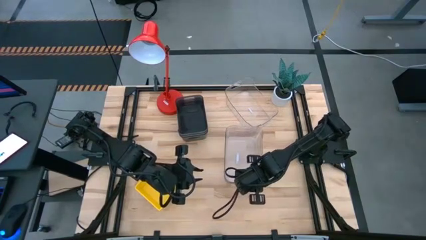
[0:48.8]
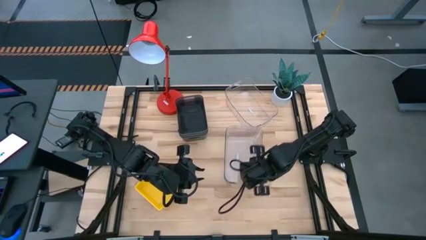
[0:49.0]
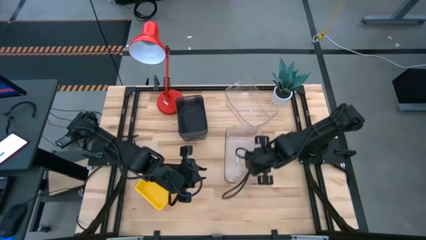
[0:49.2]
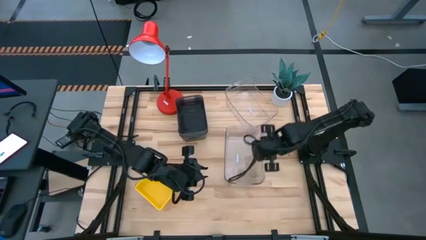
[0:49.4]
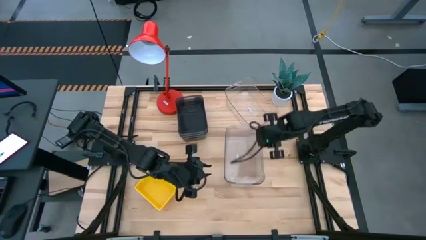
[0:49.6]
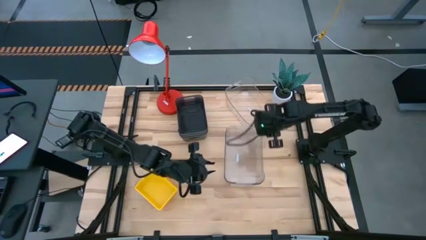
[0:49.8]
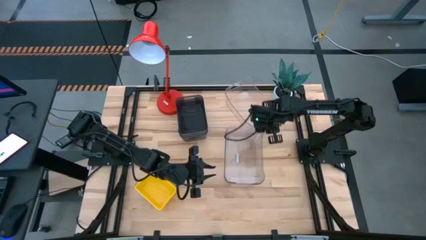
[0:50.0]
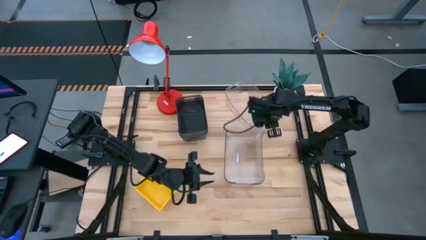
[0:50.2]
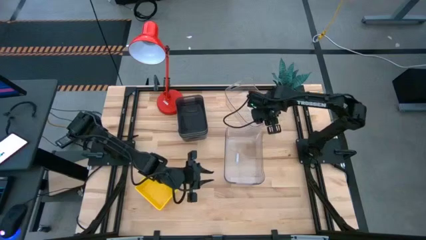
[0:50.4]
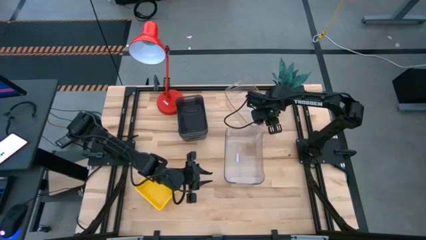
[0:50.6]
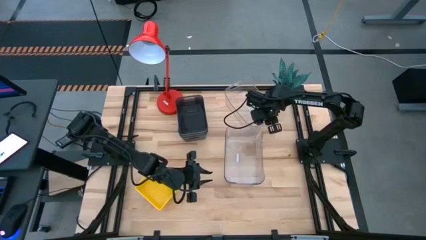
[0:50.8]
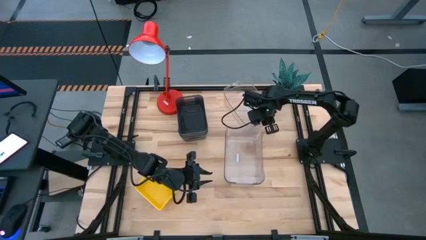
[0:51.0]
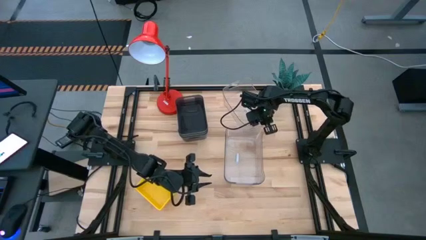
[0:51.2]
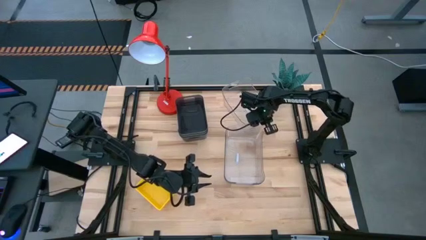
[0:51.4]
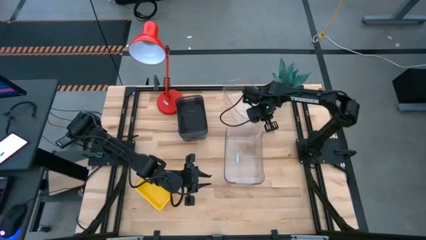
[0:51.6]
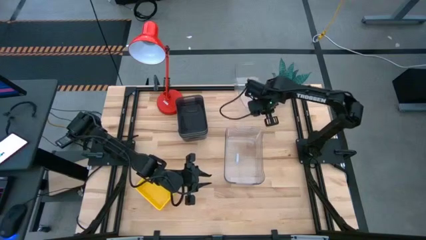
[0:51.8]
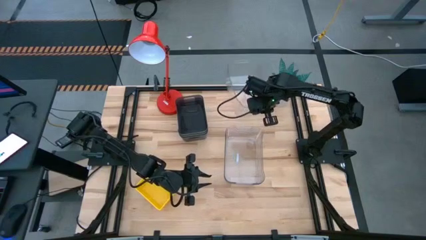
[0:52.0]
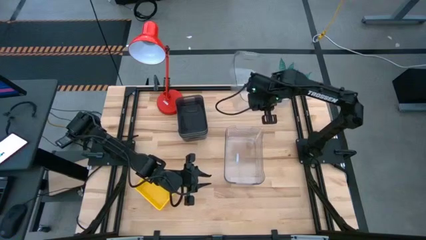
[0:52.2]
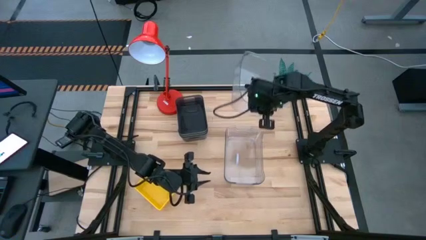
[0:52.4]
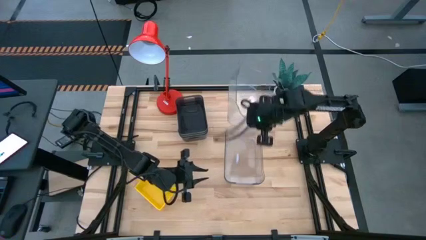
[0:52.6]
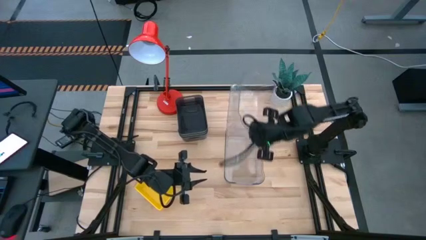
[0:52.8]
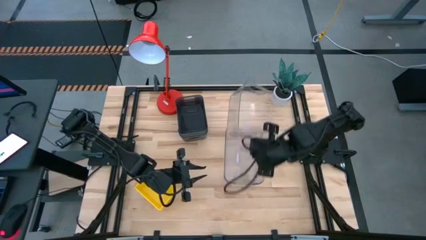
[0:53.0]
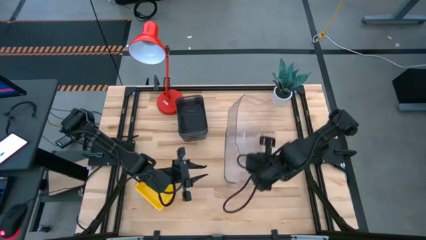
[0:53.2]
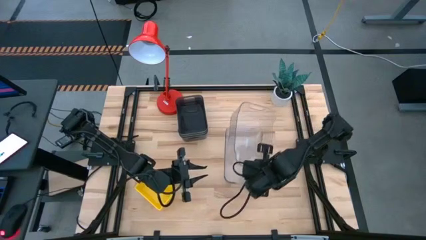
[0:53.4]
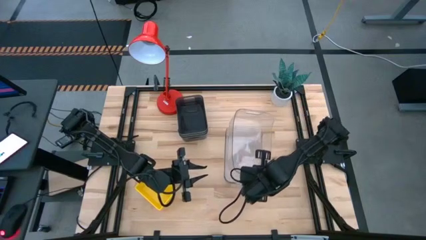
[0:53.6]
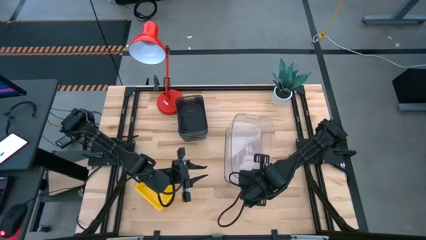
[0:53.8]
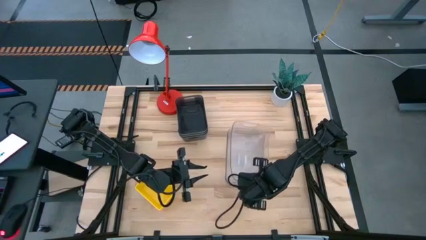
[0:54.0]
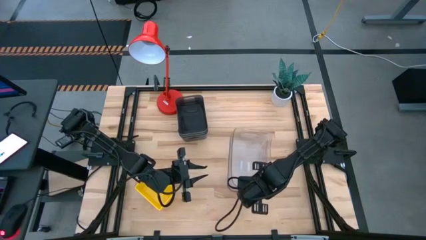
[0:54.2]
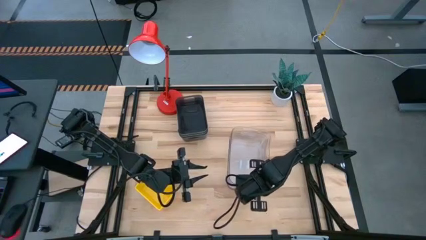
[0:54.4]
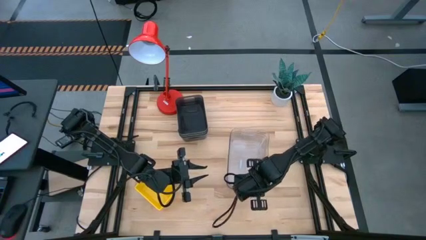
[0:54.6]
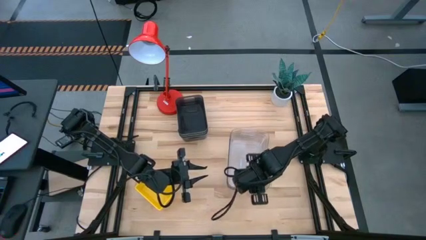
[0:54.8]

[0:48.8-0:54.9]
Stack the top transparent bin on top of the bottom transparent bin

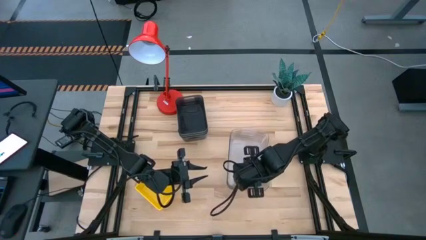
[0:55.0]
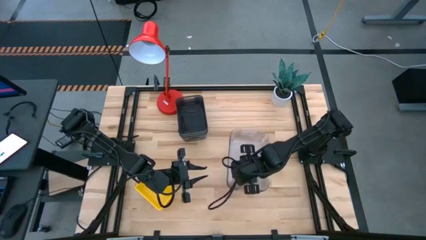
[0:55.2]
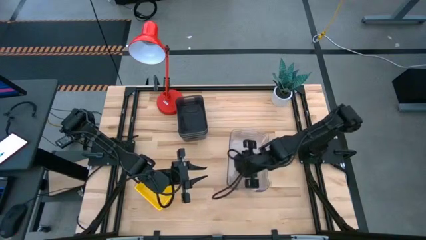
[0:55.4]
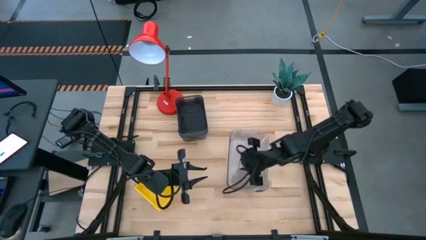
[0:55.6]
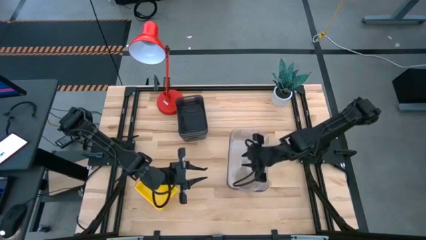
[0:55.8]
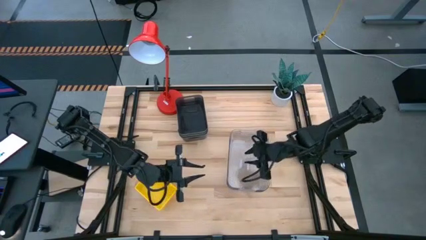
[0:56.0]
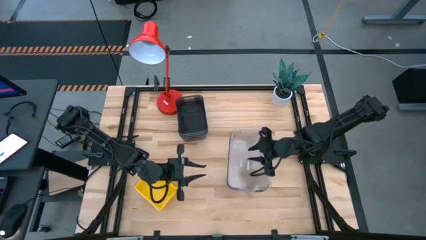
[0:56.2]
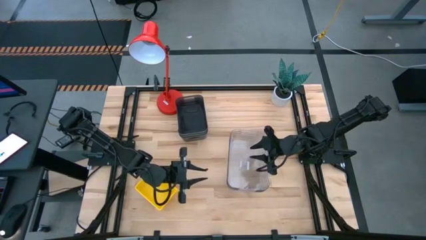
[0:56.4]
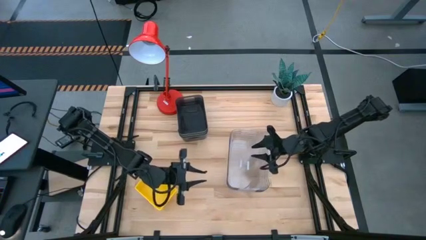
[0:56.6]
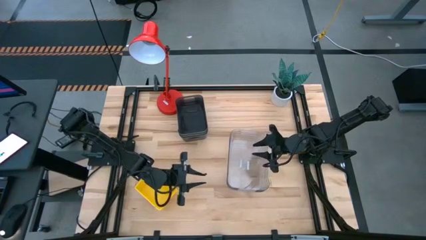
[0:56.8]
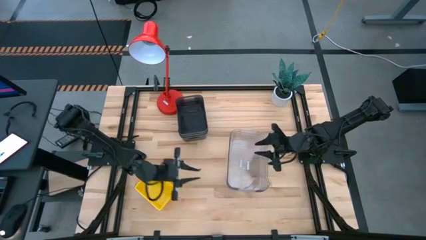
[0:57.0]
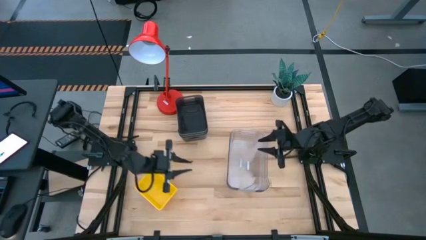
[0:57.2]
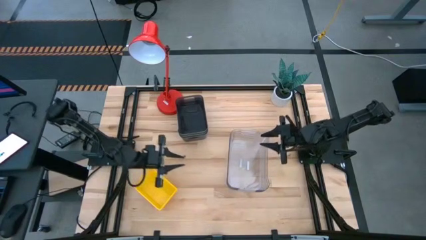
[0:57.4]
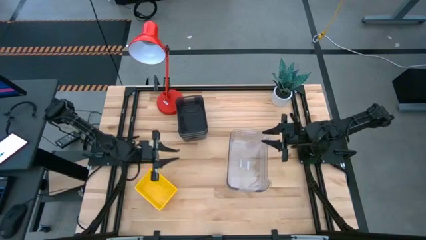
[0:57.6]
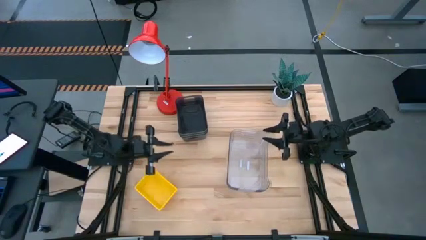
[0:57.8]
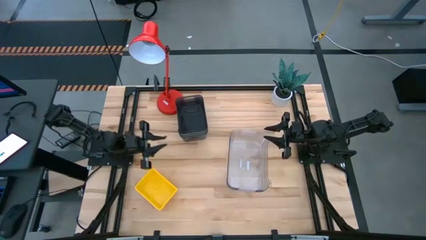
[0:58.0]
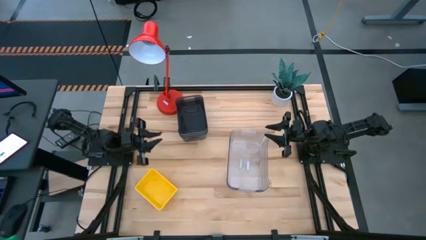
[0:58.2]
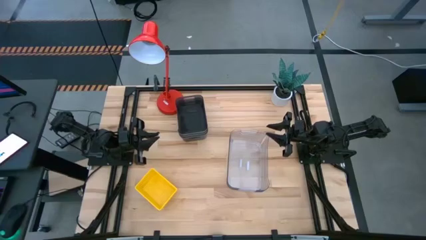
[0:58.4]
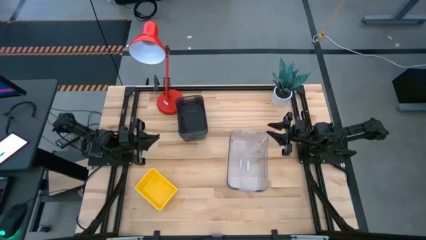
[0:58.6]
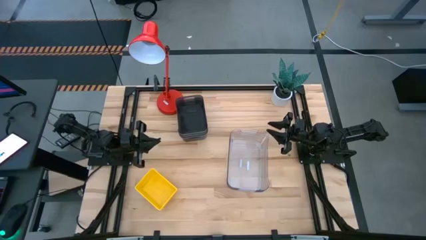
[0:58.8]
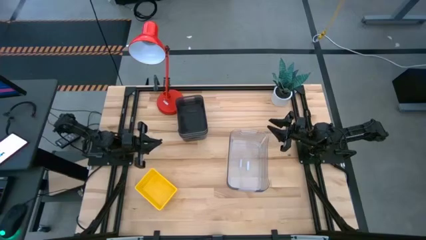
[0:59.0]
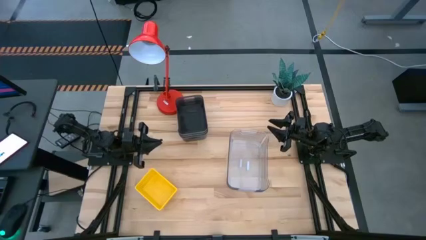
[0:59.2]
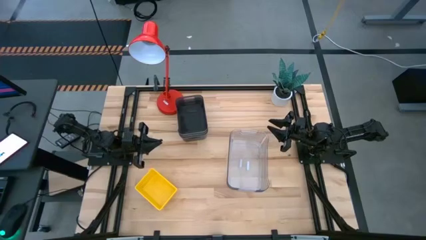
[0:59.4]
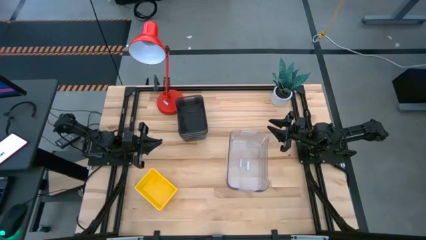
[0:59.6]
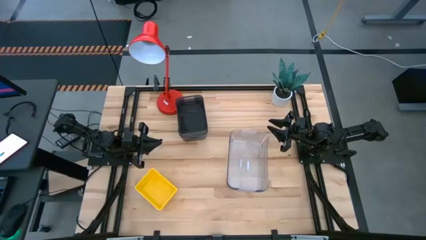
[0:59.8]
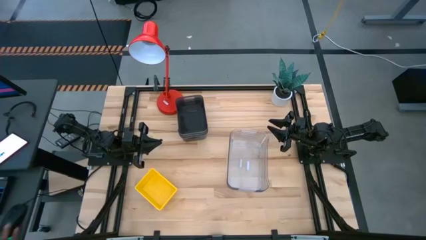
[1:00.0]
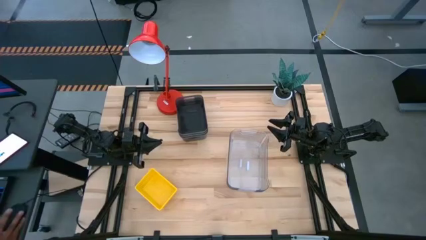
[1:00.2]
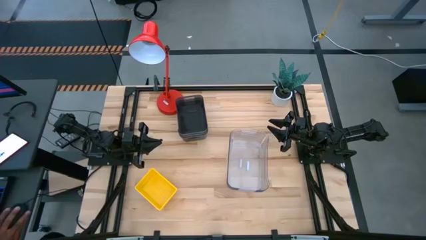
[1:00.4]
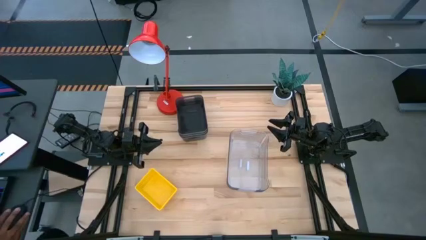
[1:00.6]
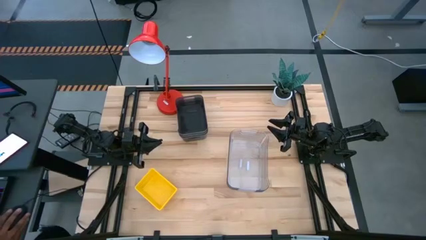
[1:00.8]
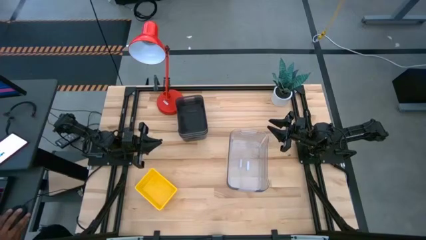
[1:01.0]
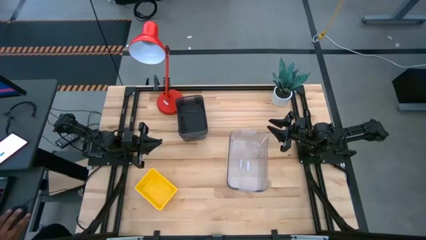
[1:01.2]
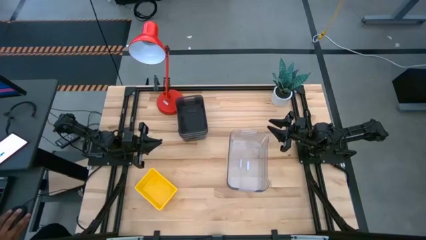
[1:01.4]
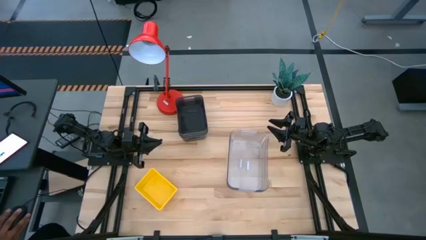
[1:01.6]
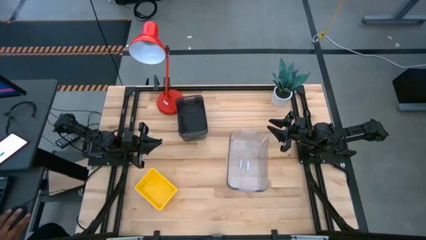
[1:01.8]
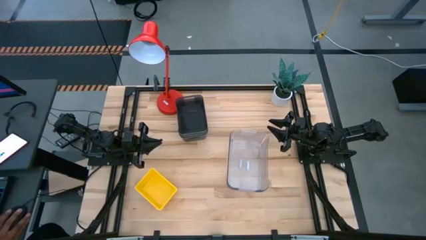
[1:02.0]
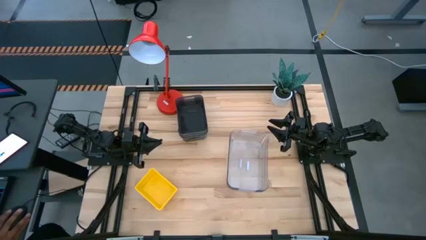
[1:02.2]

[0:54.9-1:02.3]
Return to Home Position
